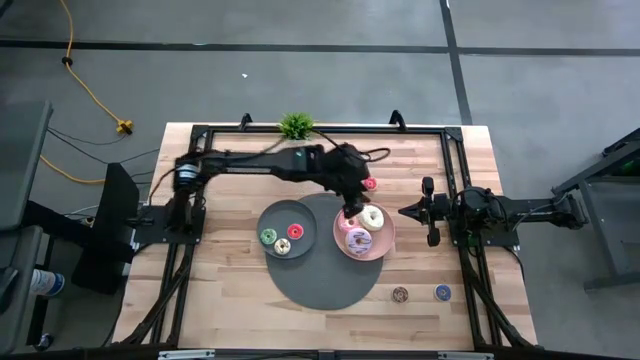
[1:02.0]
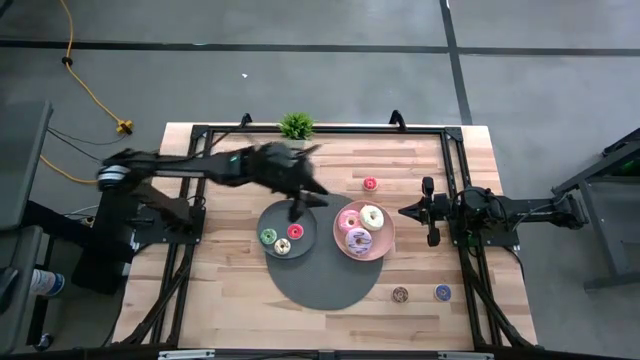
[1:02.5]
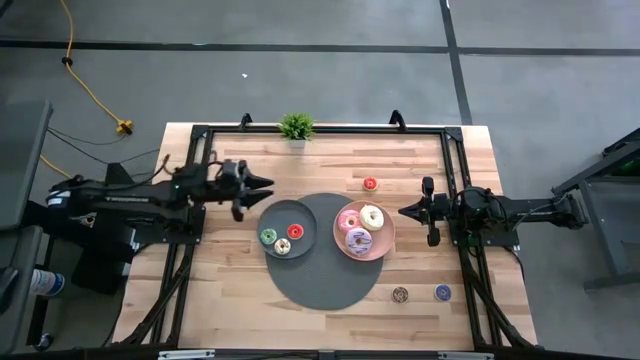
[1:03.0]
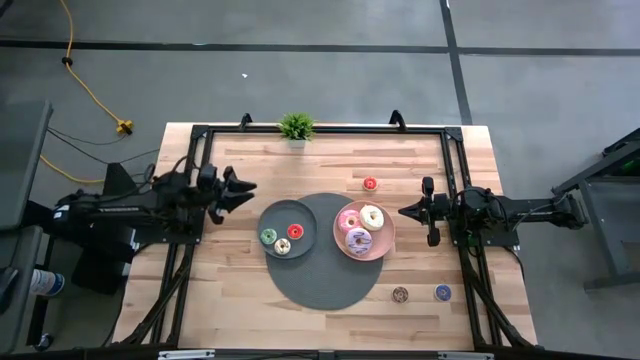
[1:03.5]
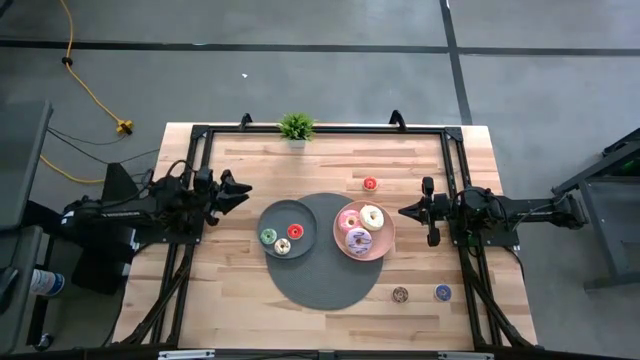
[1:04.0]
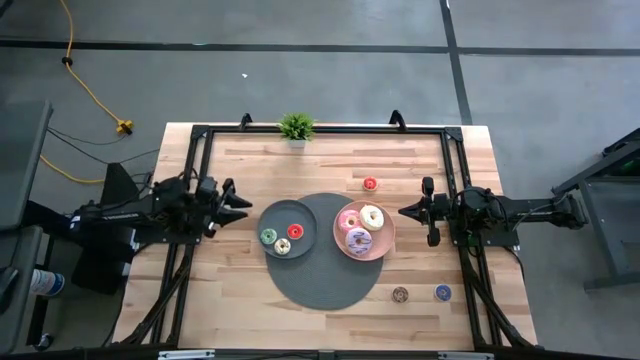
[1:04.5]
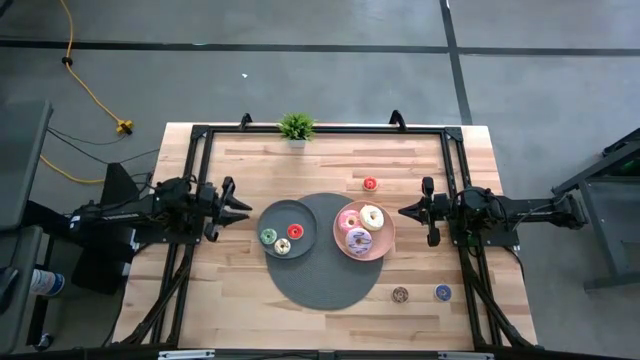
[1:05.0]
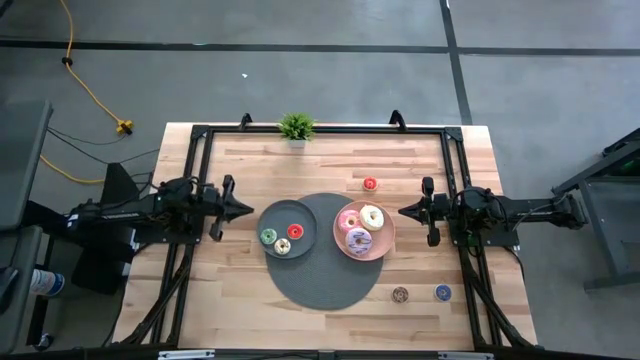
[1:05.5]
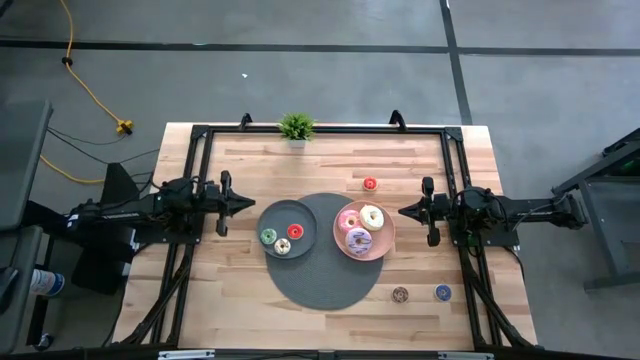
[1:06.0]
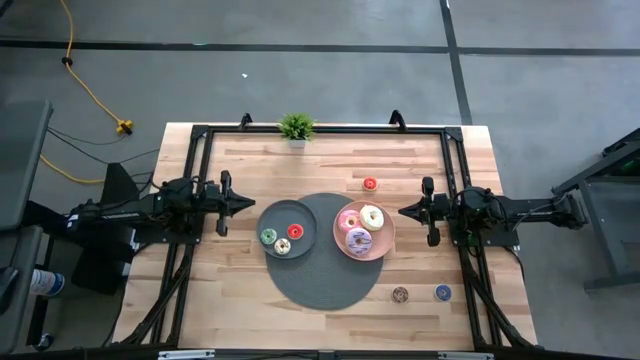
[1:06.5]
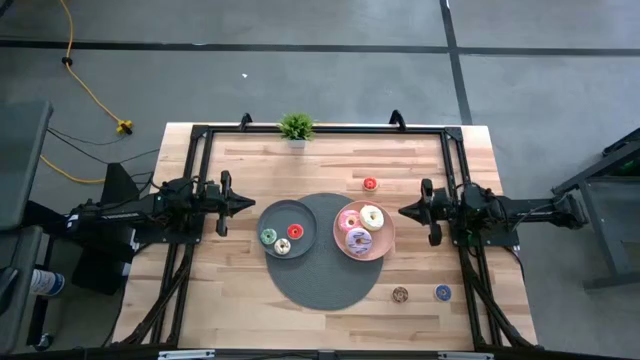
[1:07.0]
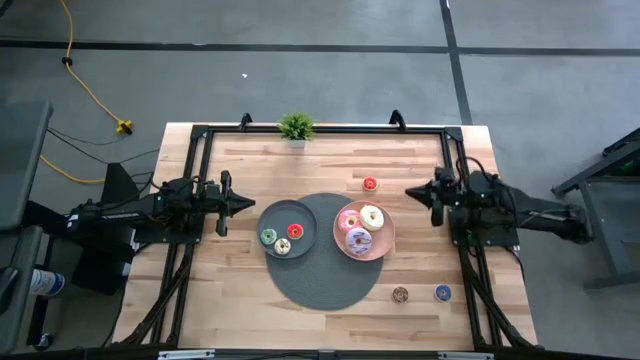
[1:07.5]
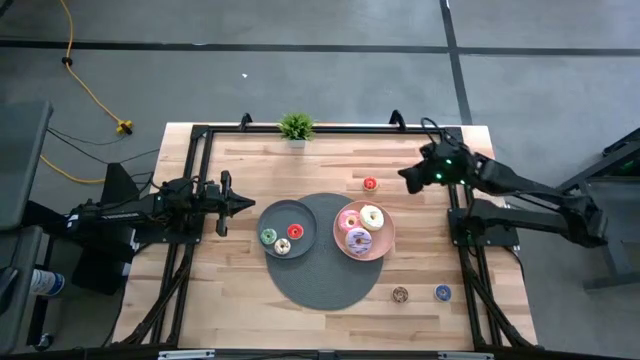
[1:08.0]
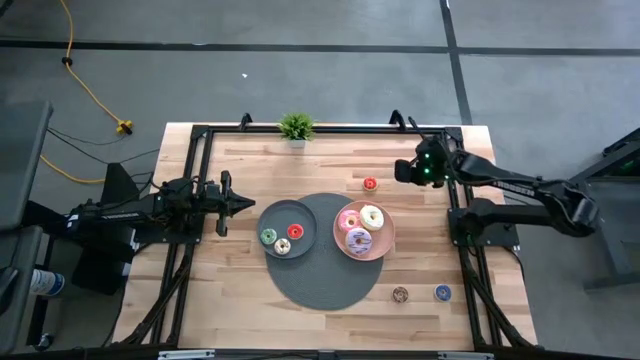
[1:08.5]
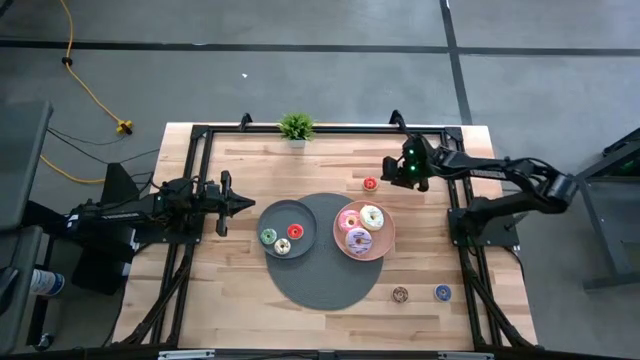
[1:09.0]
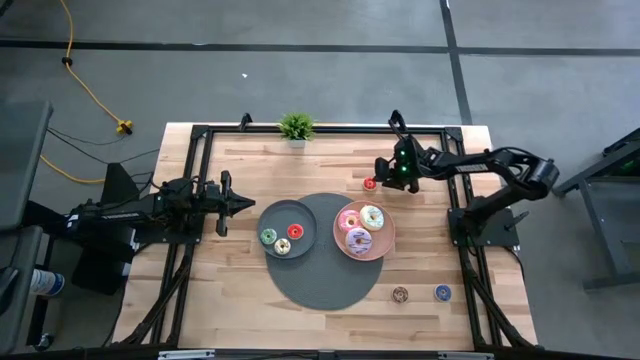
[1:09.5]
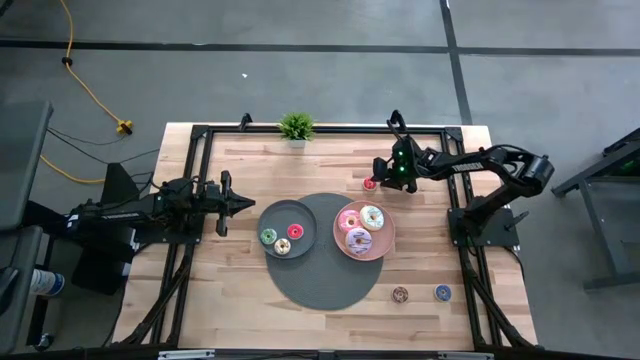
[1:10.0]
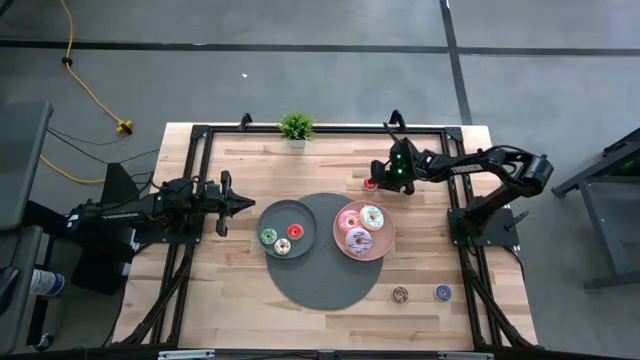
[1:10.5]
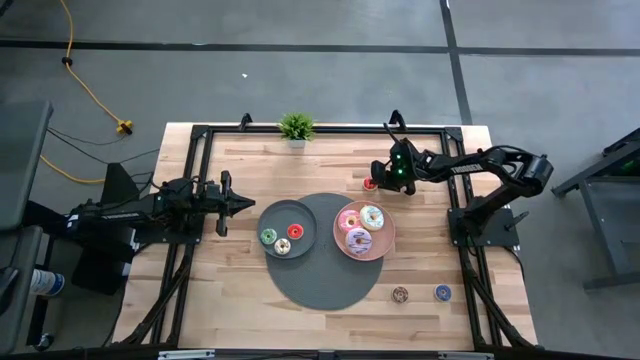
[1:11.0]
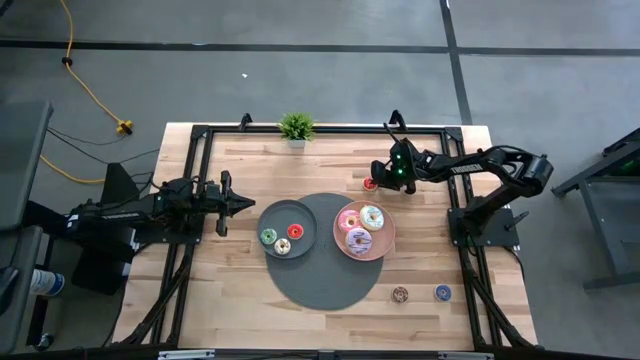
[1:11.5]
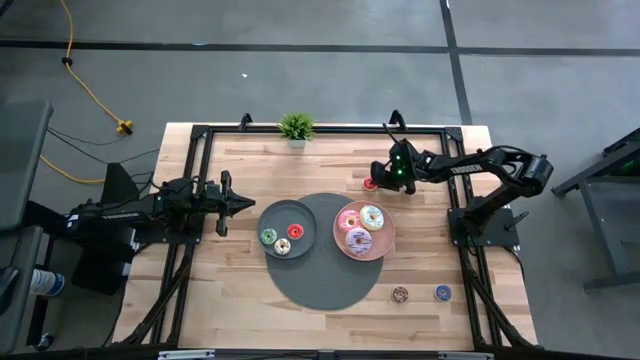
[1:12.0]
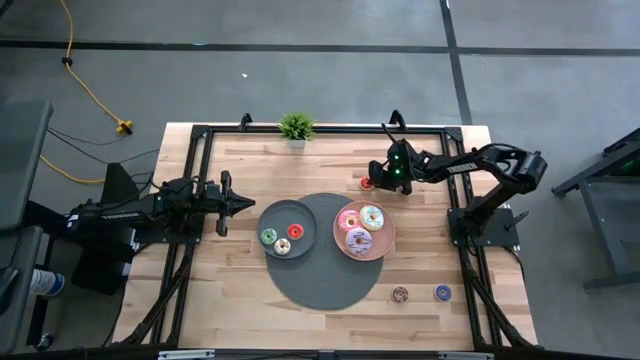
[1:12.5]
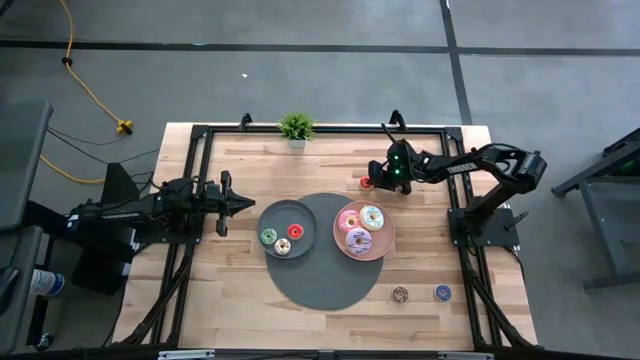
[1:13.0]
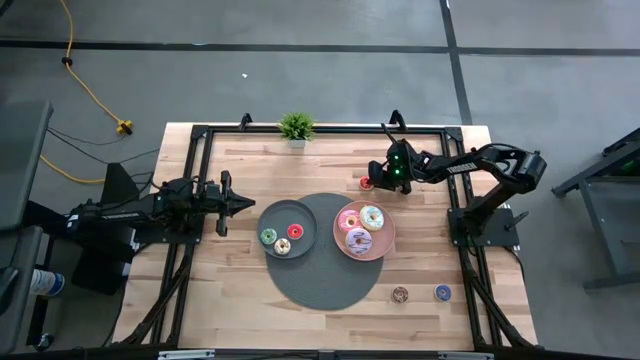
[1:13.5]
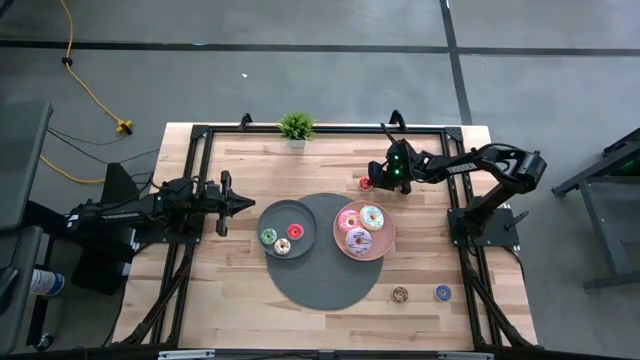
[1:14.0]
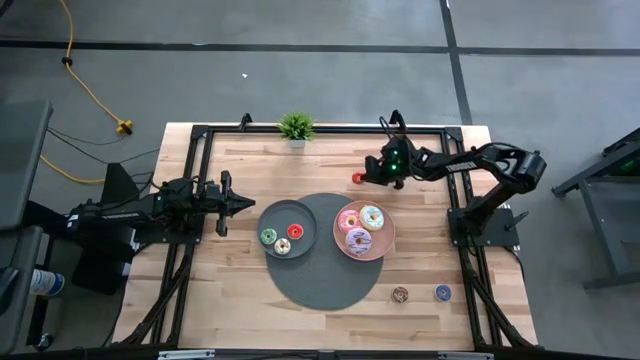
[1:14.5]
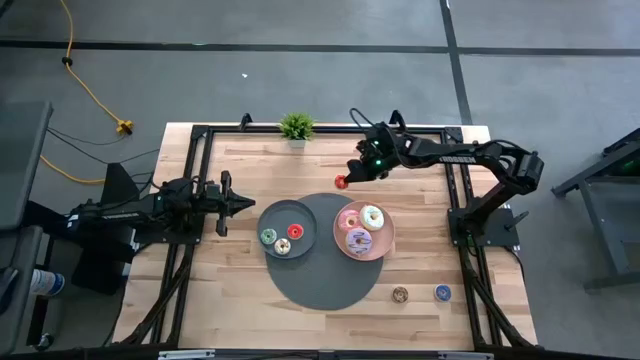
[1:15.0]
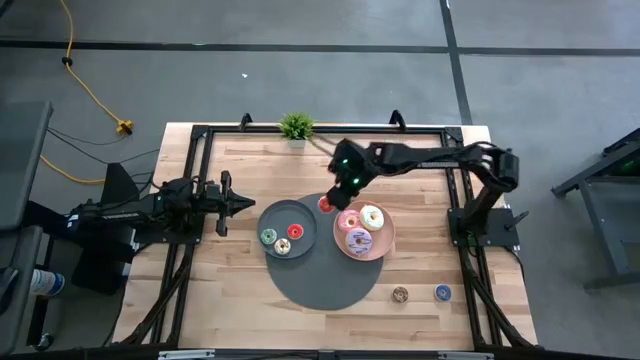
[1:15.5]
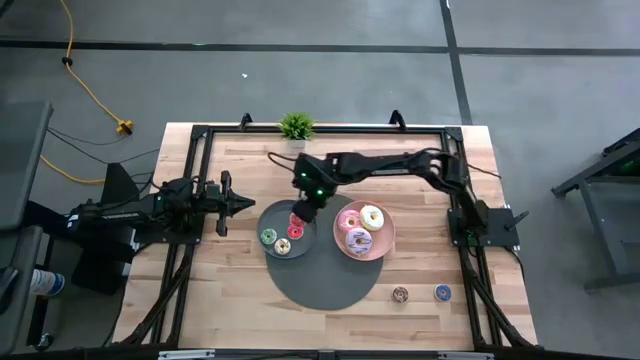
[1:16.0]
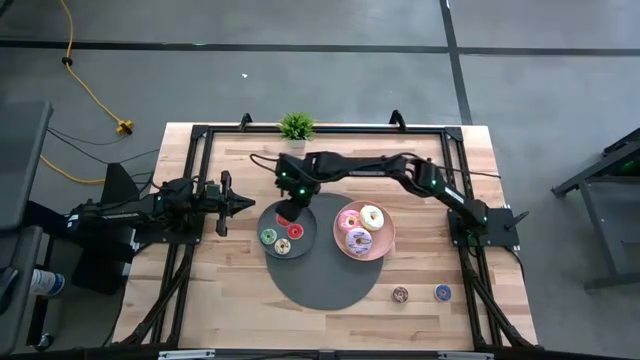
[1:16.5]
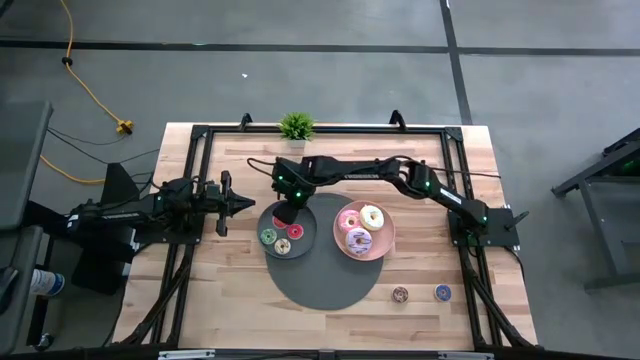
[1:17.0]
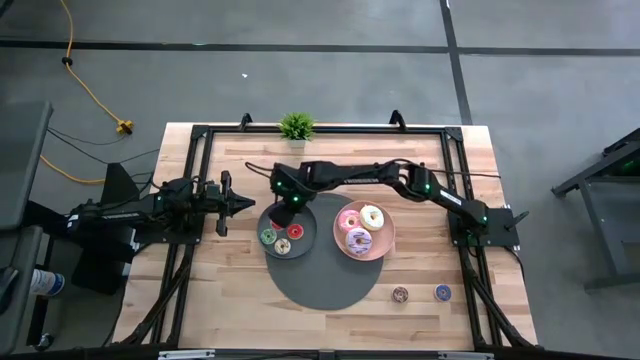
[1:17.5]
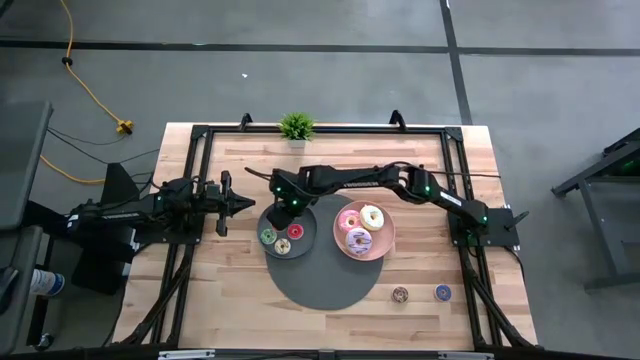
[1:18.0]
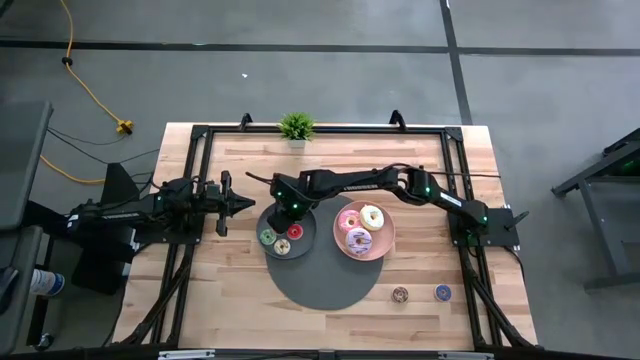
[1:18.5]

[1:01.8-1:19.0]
Task: Pick & Place donuts
Put the small orange donut on the gray plate

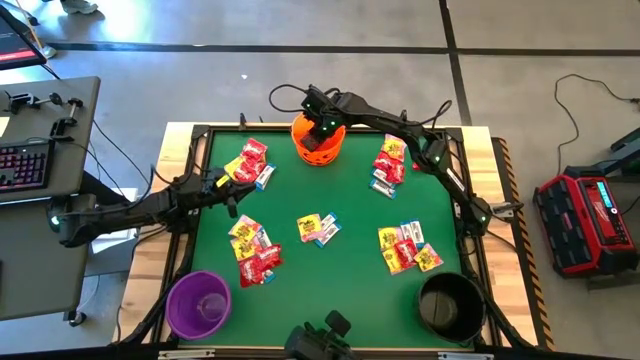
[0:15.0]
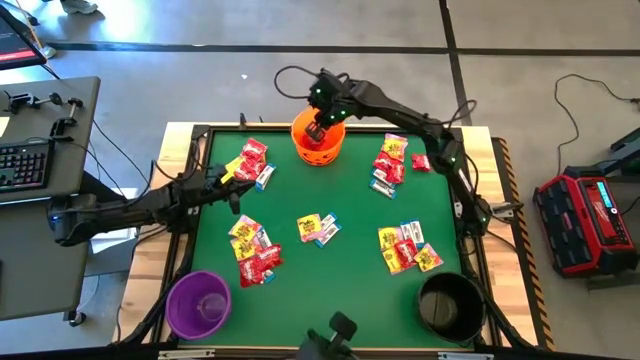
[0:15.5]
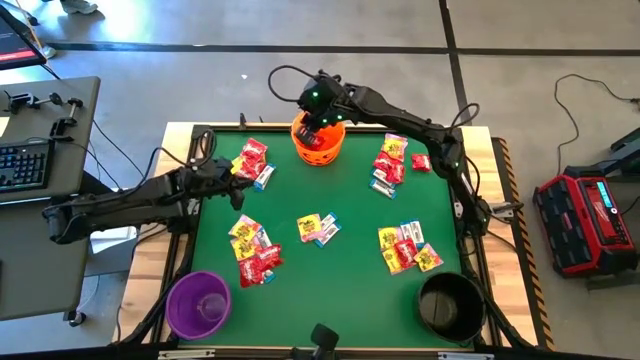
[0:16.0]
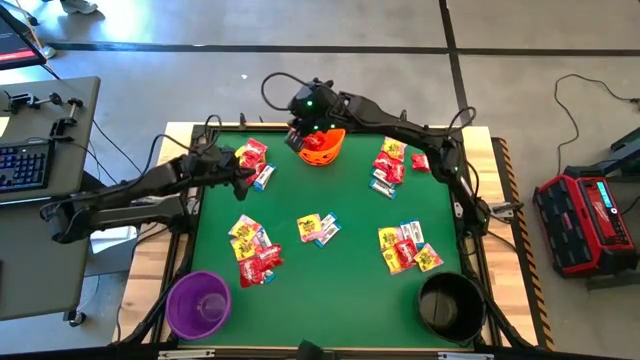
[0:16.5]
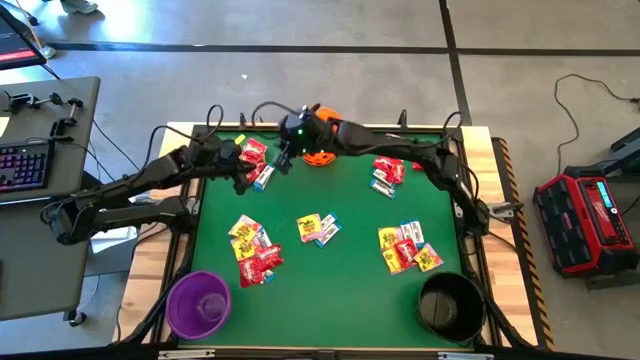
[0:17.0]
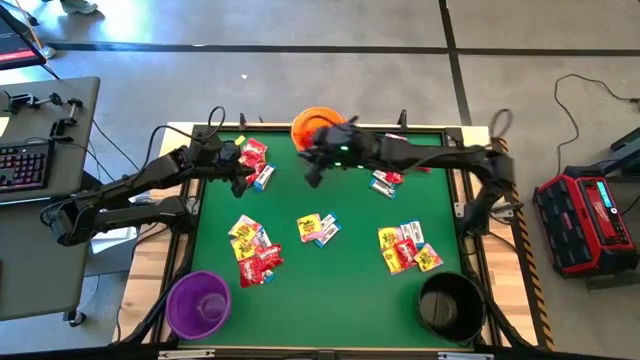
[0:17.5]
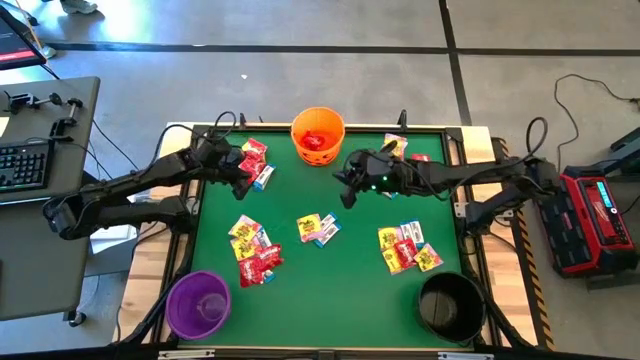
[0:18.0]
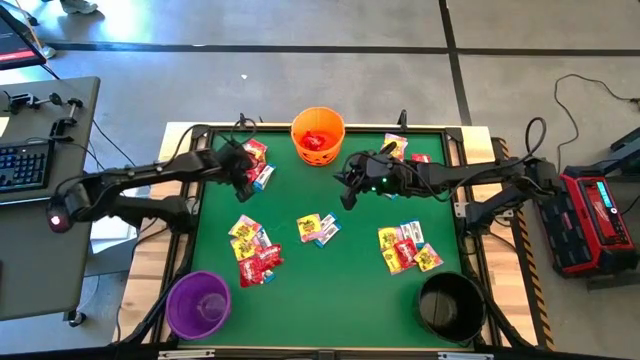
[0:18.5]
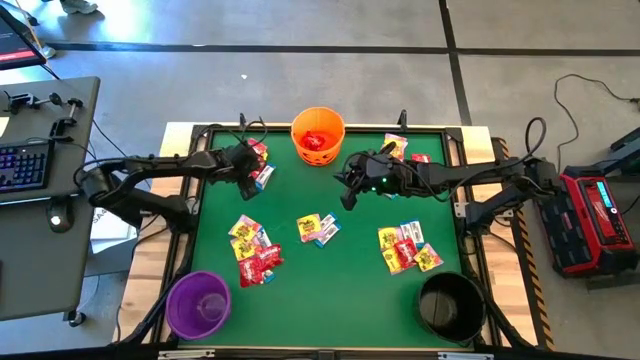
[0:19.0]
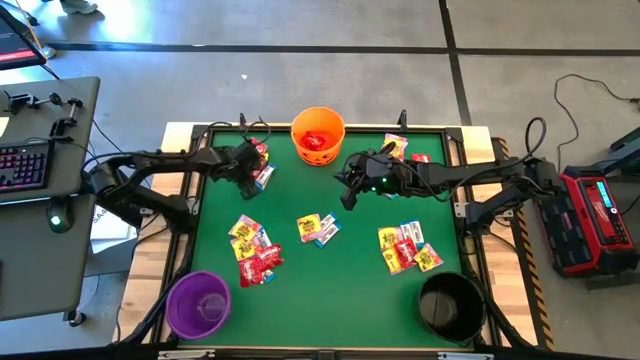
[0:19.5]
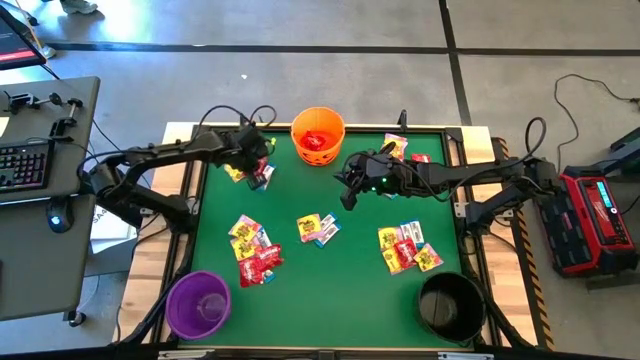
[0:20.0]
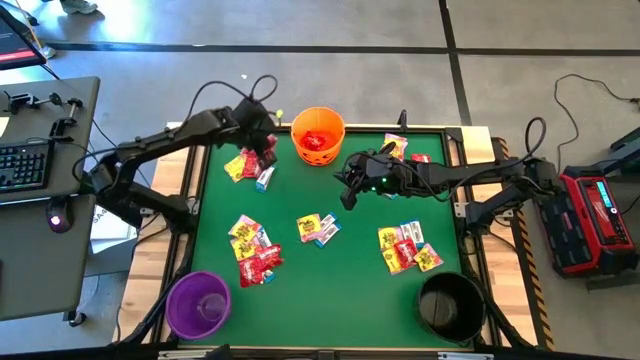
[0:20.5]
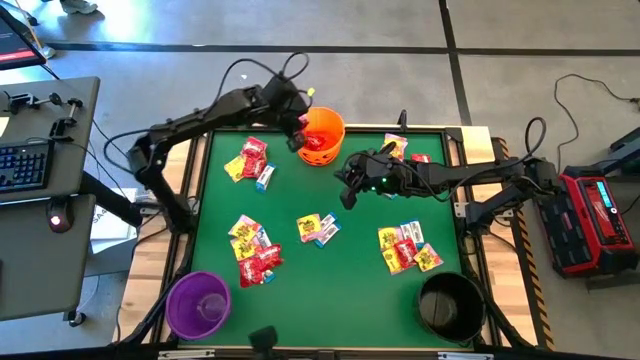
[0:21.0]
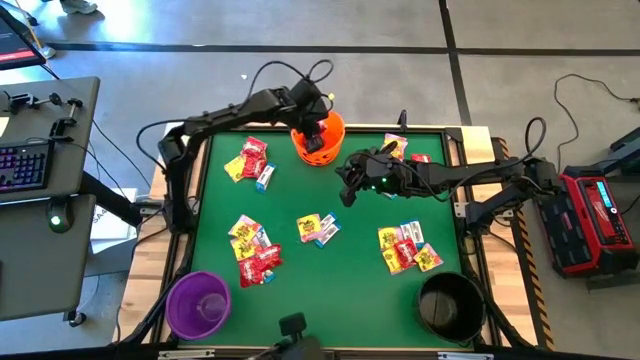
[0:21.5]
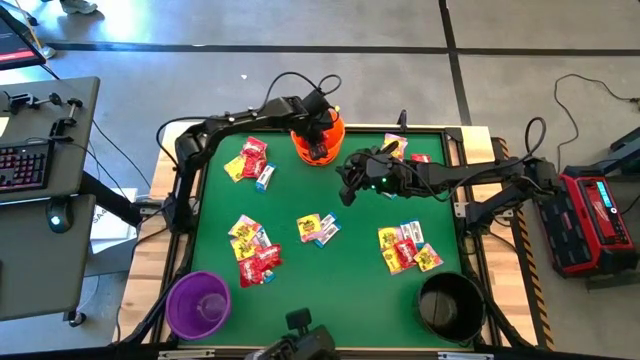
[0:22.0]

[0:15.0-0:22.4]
Task: Sort candy by brand, put in halloween buckets
Put the red candy into the orange bucket
